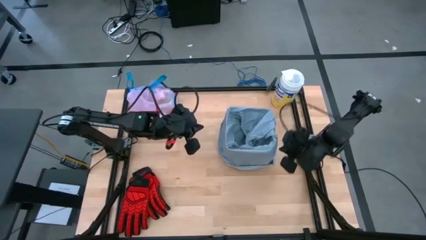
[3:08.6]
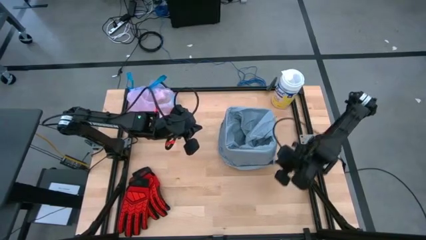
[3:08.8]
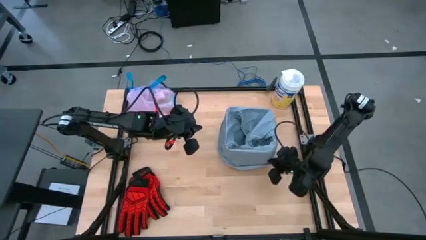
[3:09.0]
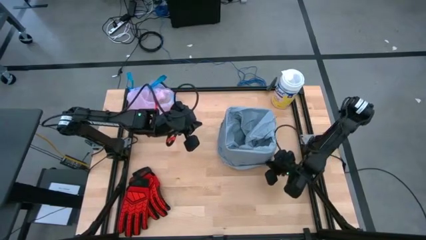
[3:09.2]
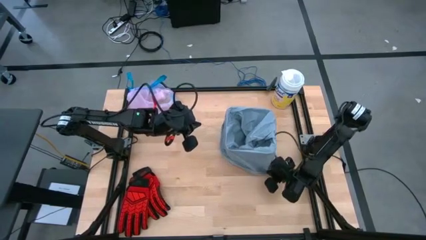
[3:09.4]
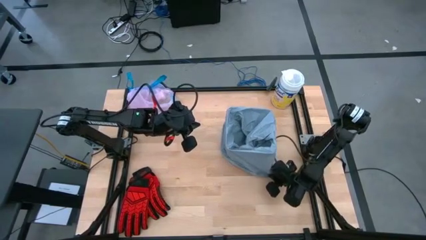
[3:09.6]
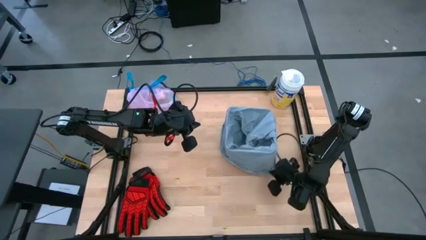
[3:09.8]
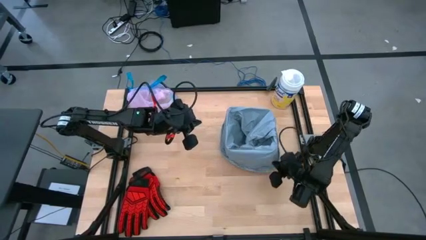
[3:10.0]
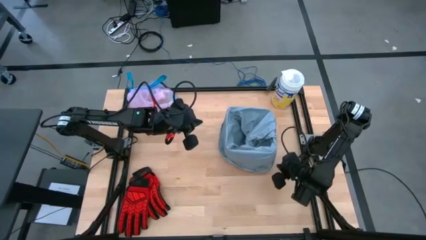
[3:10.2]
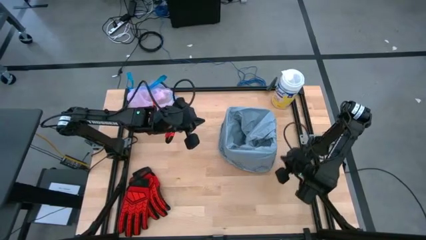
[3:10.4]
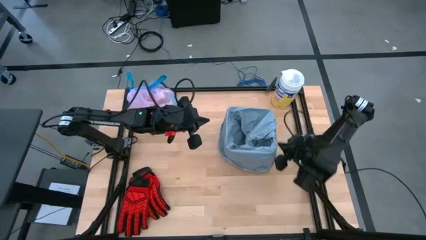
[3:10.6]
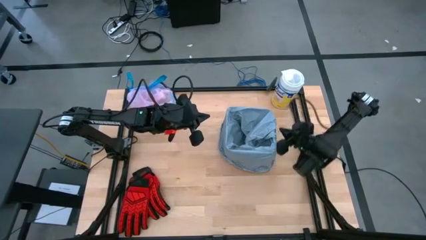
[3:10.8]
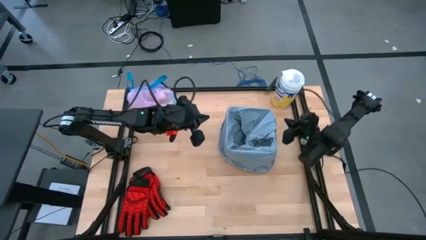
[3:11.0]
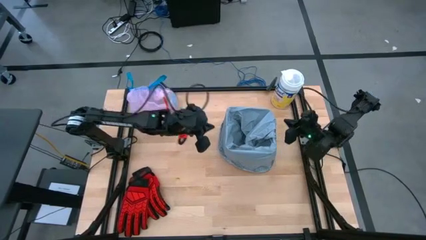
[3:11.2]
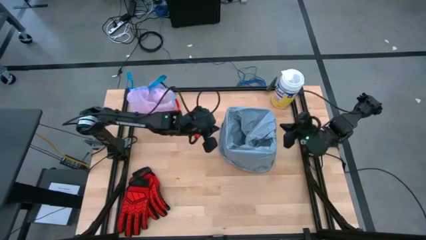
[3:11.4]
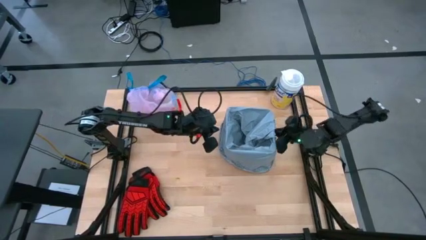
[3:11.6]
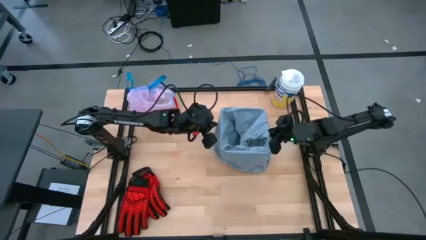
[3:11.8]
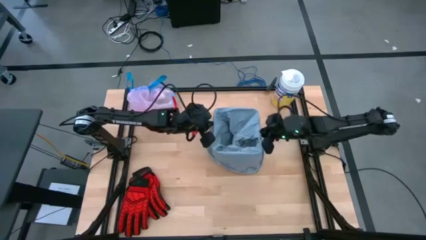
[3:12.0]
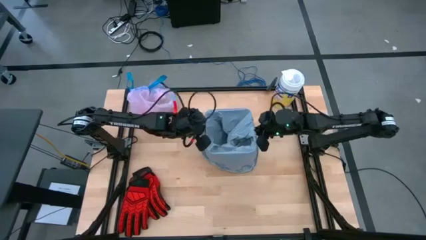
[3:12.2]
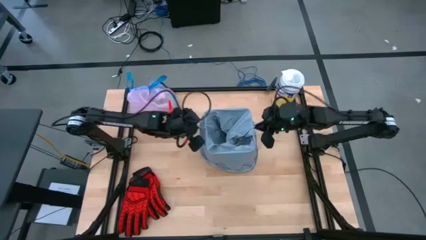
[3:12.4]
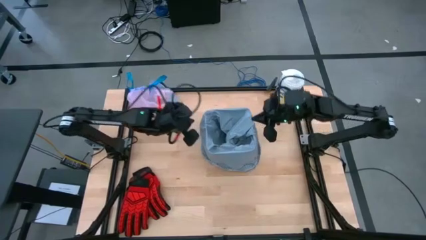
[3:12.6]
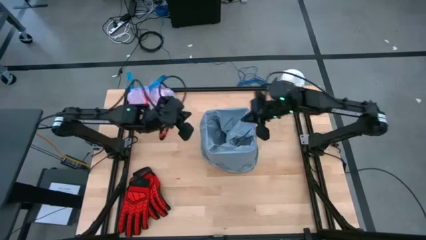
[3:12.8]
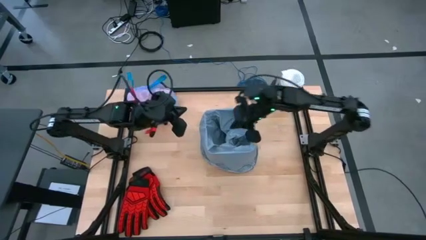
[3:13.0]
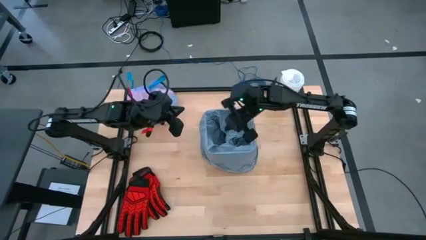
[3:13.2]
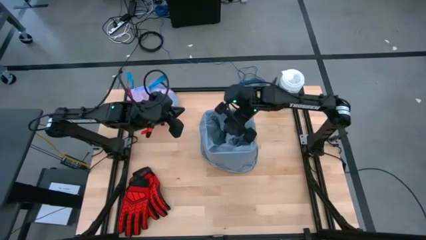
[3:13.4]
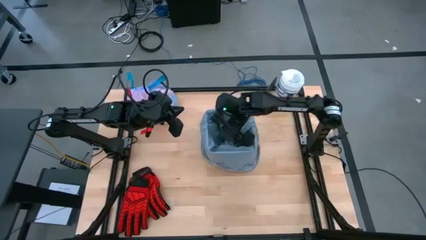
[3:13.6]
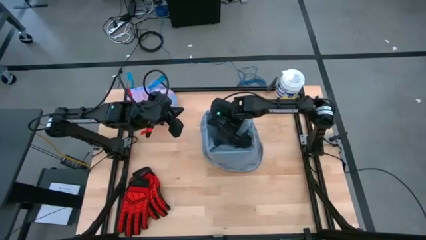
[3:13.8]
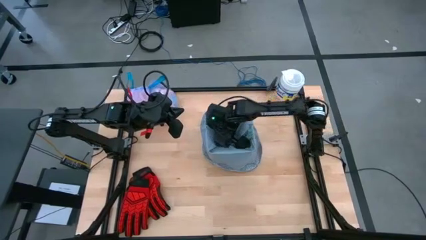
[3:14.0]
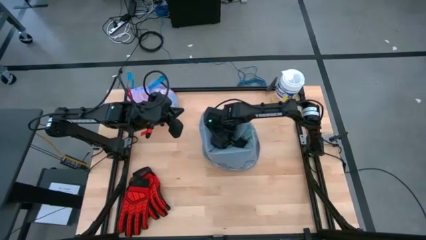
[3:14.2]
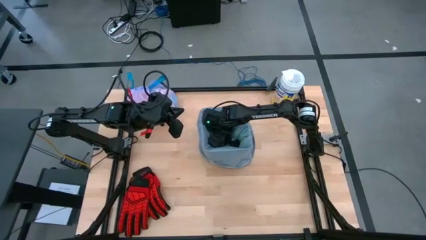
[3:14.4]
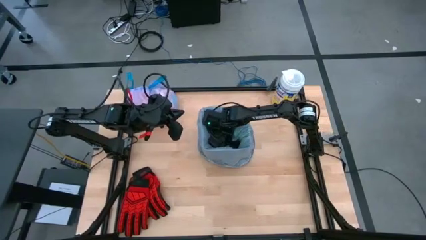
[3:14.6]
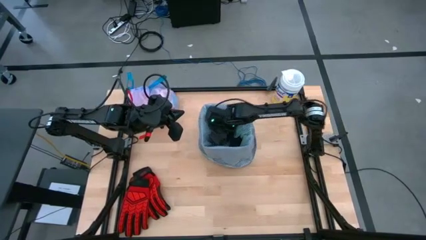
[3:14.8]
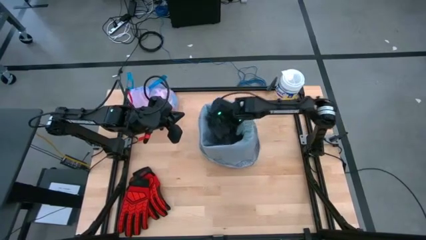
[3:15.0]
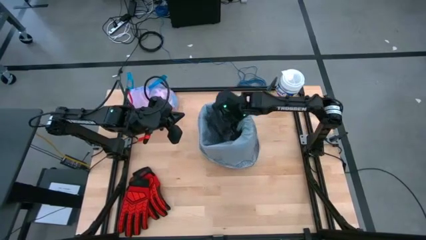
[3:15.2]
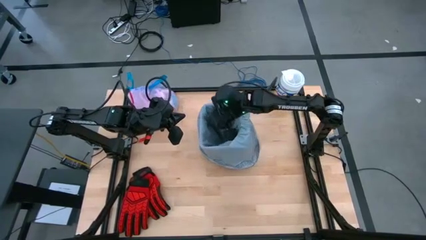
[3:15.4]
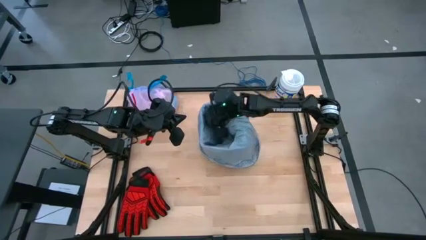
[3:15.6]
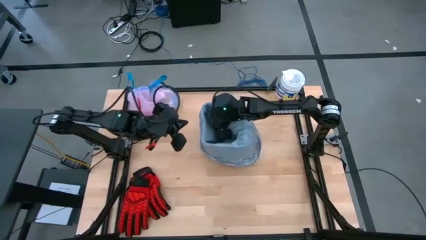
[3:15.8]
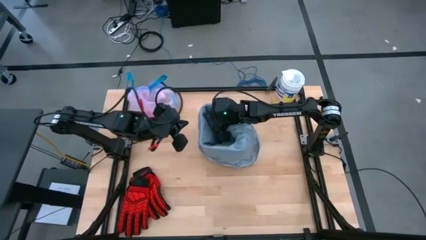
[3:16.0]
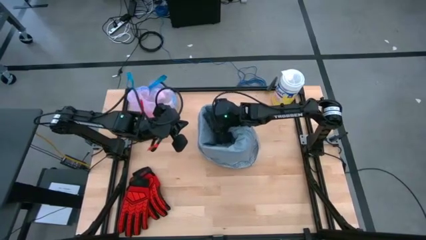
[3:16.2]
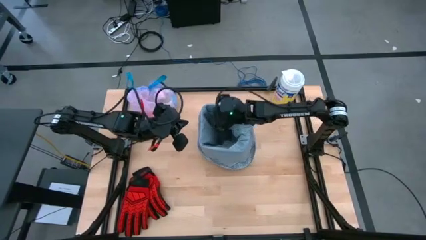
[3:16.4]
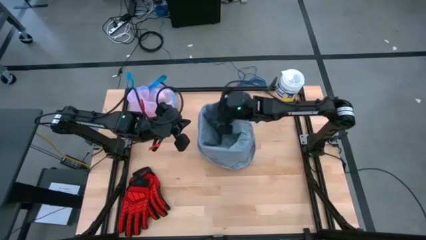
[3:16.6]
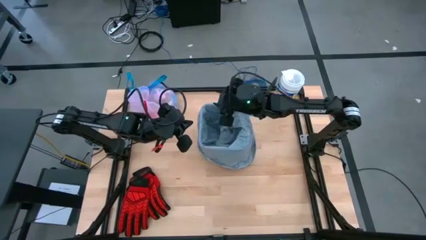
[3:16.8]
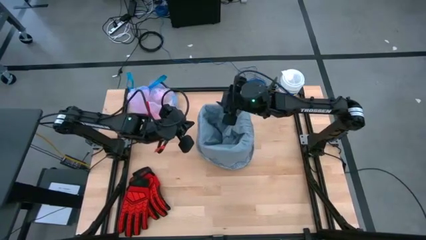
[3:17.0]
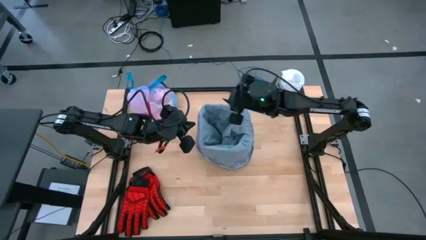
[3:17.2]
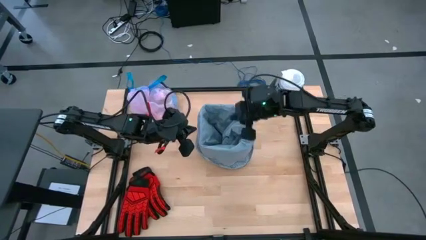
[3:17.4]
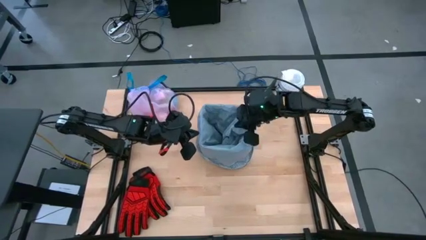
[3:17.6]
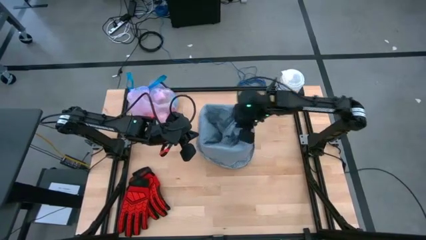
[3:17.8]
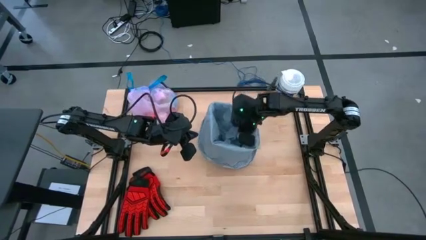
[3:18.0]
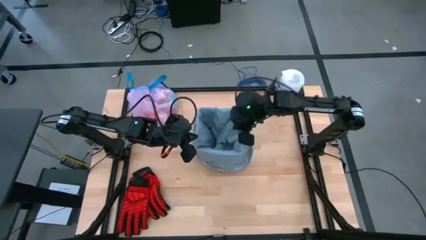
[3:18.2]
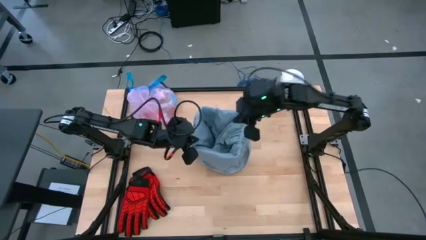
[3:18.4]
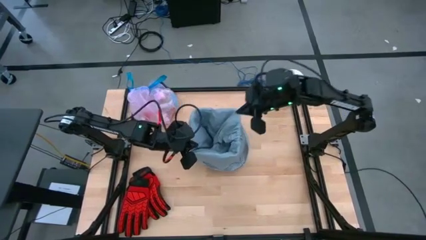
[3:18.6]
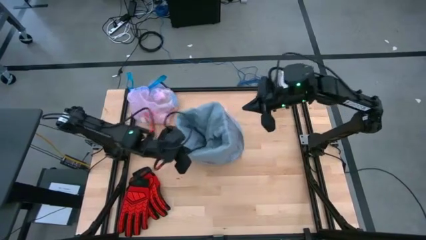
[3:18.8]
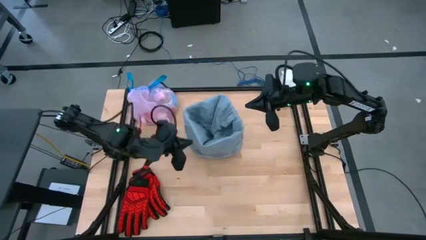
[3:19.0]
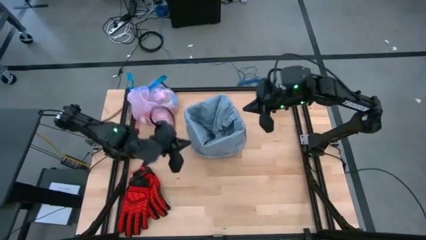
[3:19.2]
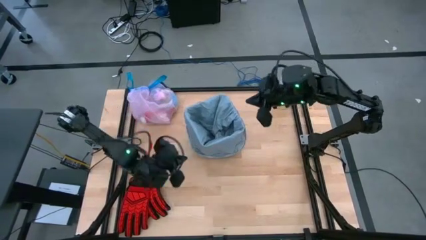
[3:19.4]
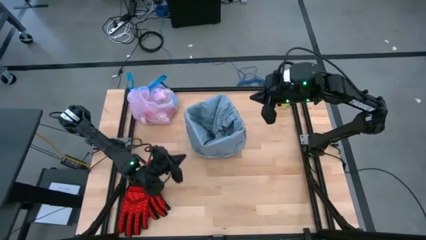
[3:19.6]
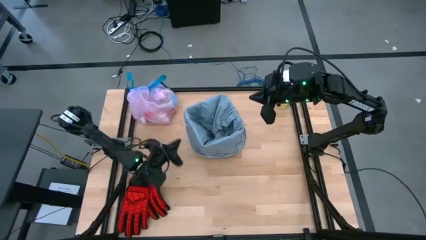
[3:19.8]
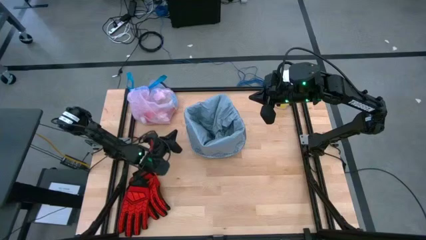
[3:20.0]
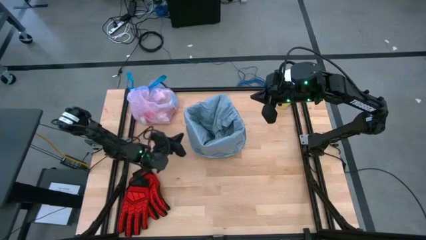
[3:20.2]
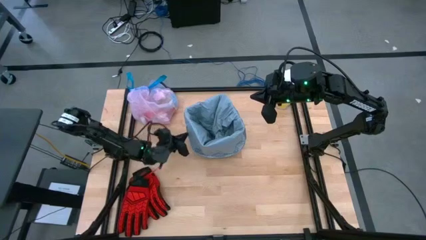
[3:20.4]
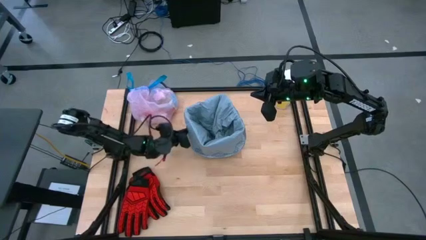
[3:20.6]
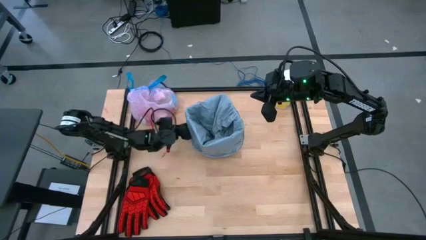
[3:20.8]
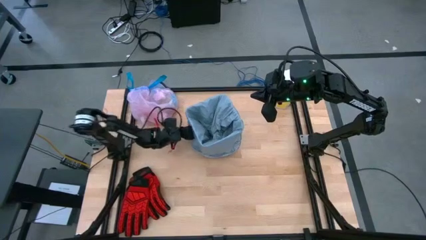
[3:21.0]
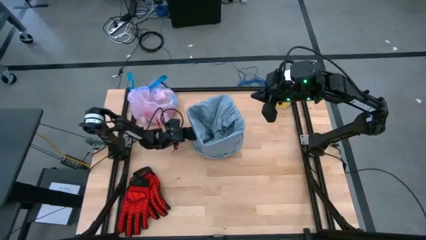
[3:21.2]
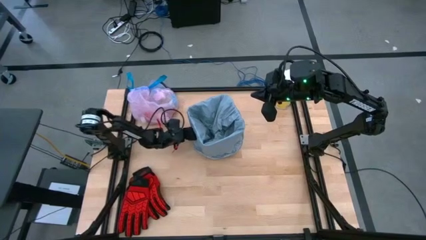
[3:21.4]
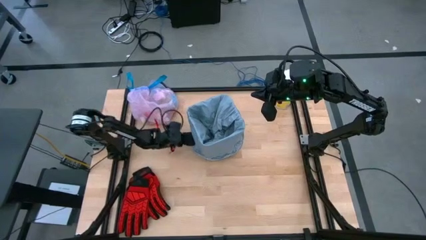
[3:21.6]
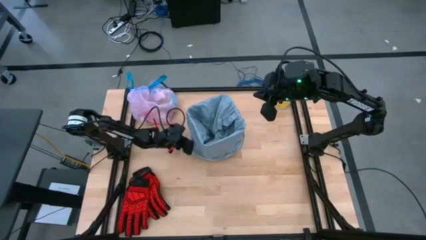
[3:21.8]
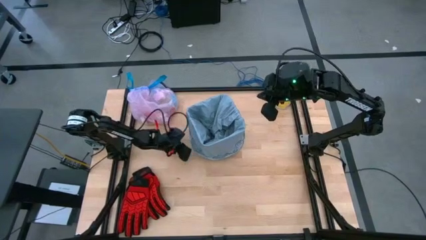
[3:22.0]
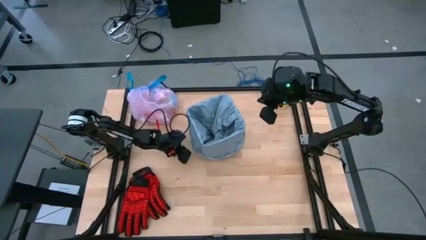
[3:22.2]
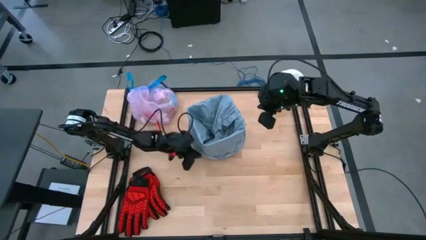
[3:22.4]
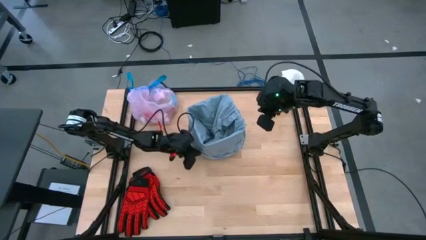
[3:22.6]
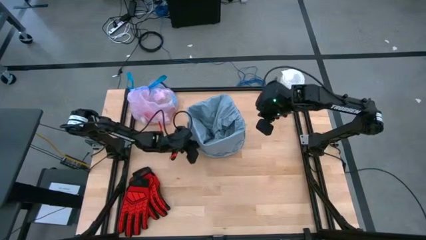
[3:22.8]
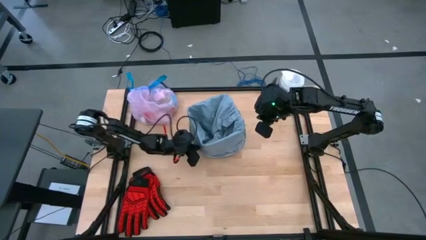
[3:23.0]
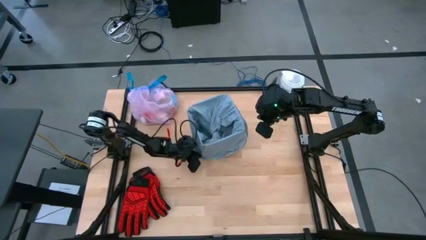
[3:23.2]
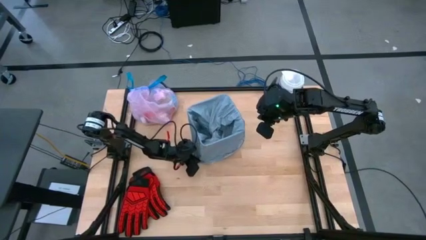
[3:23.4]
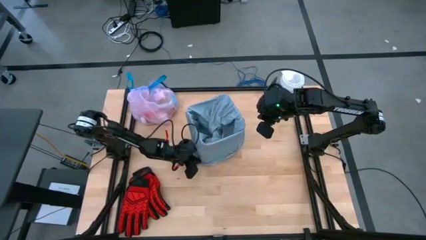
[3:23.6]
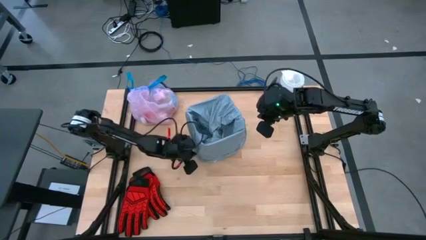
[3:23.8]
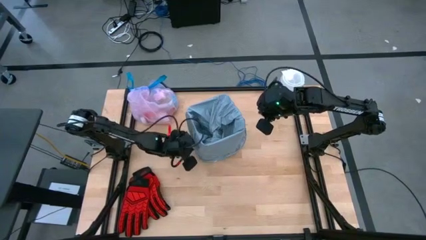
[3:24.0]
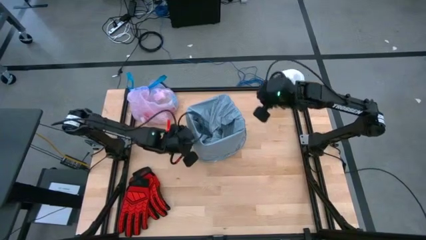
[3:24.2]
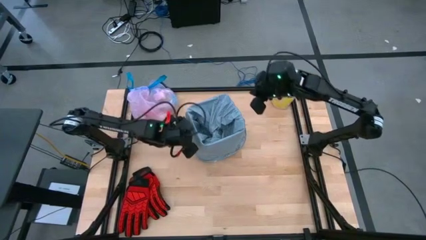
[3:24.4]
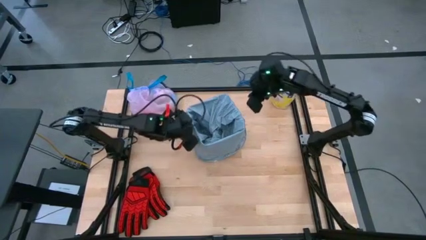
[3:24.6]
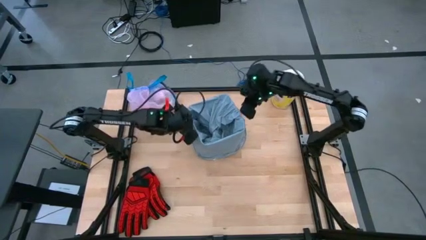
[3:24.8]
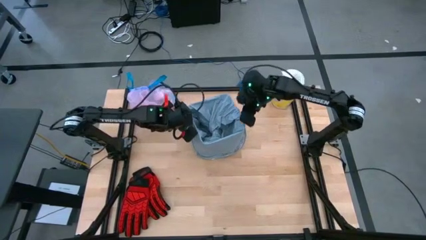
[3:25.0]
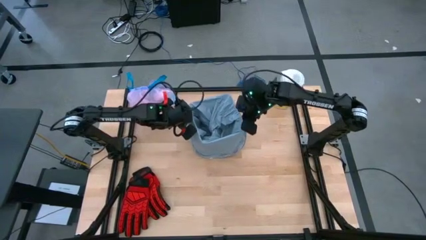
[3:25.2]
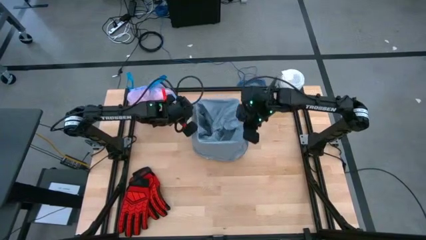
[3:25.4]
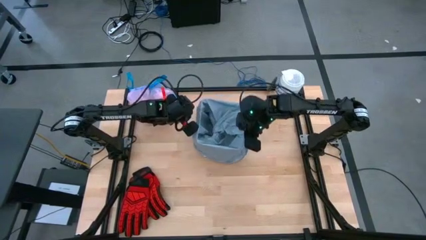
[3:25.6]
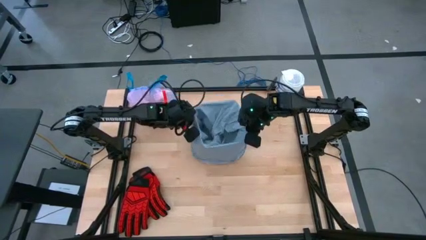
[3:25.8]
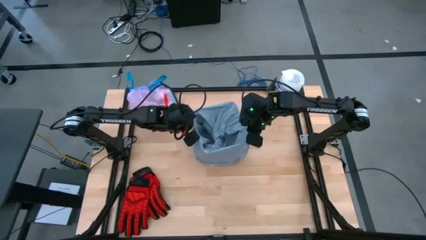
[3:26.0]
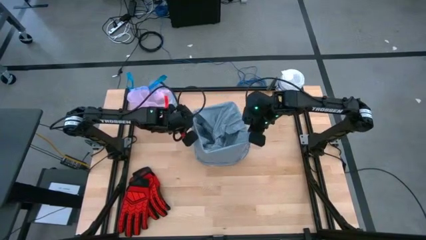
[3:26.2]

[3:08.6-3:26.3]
Task: place trash/remove bag and relplace
Put the gray trash bag into the trash bin
